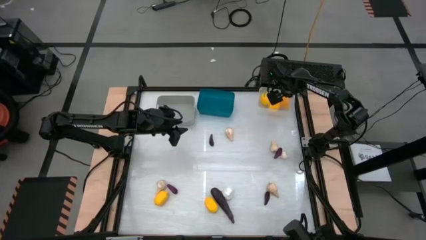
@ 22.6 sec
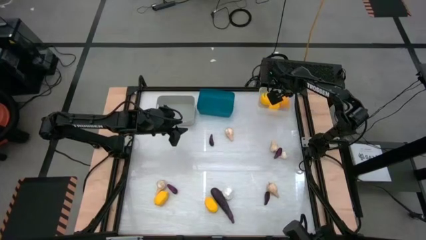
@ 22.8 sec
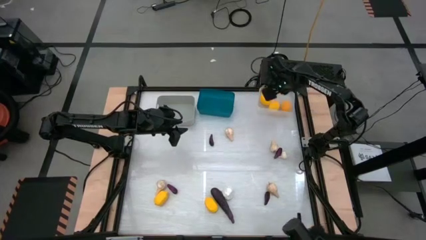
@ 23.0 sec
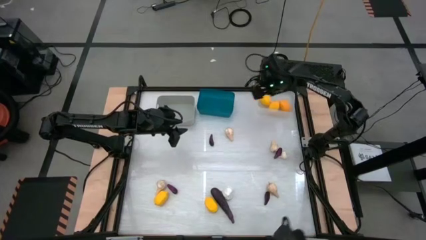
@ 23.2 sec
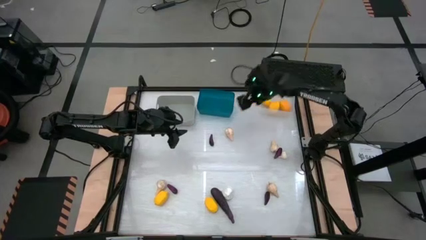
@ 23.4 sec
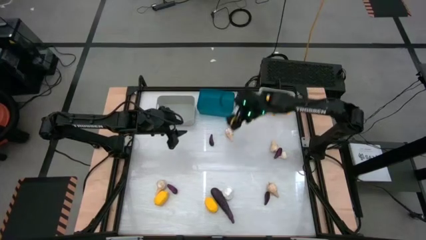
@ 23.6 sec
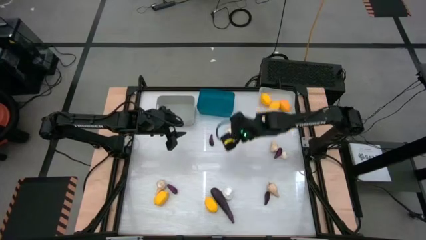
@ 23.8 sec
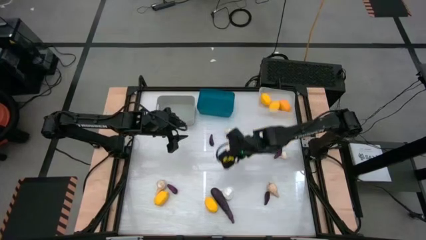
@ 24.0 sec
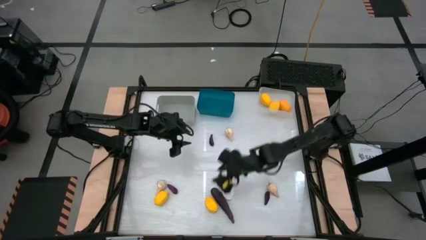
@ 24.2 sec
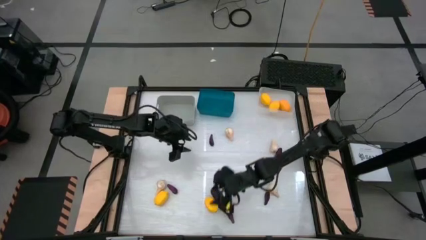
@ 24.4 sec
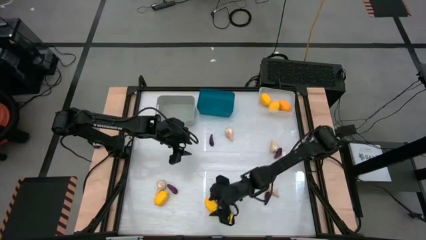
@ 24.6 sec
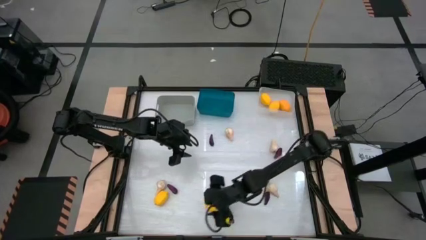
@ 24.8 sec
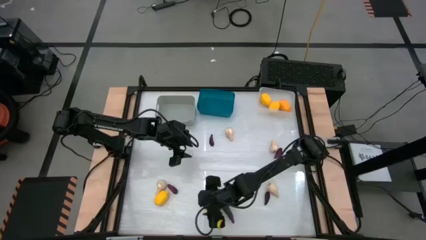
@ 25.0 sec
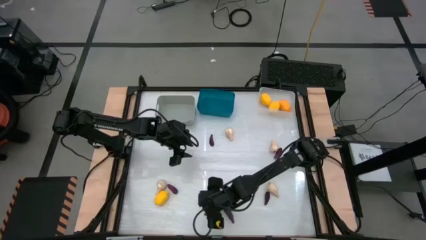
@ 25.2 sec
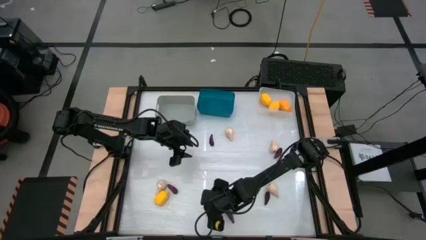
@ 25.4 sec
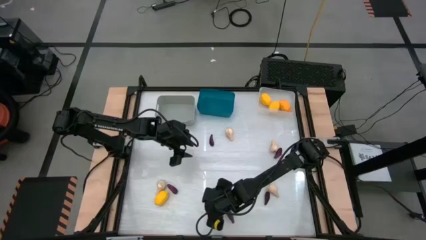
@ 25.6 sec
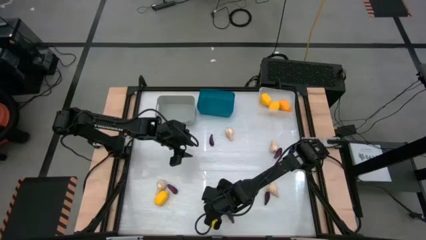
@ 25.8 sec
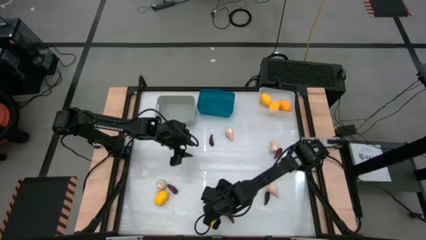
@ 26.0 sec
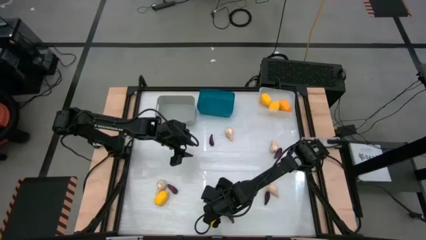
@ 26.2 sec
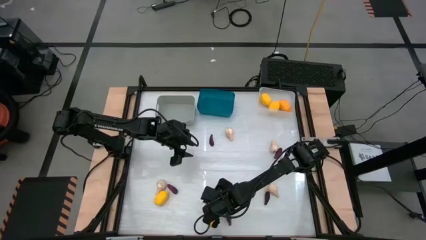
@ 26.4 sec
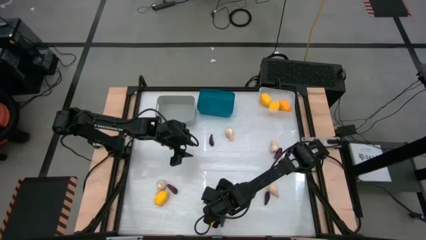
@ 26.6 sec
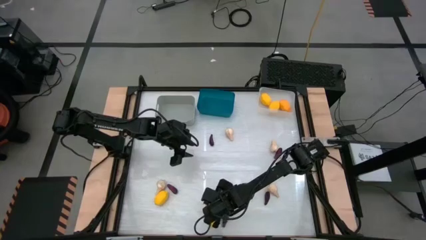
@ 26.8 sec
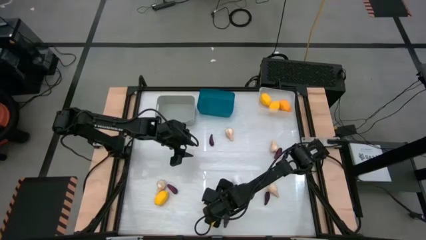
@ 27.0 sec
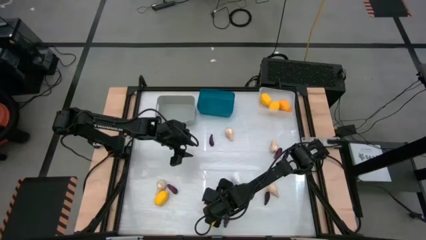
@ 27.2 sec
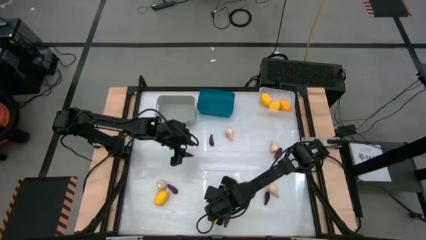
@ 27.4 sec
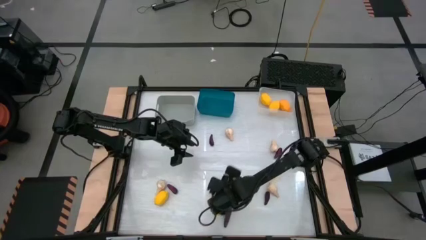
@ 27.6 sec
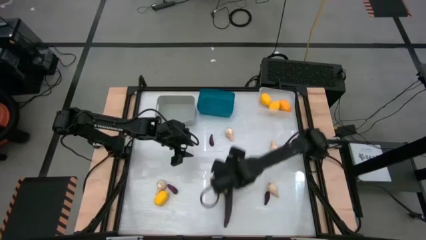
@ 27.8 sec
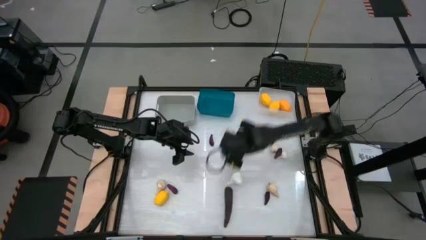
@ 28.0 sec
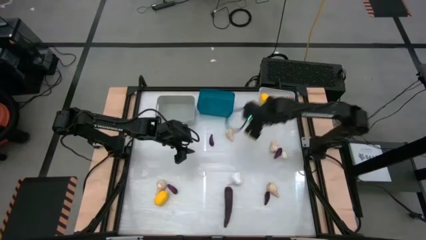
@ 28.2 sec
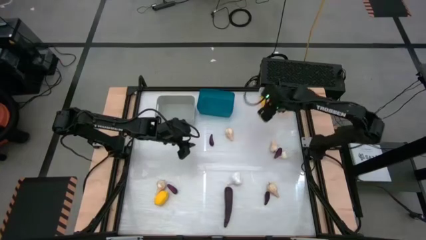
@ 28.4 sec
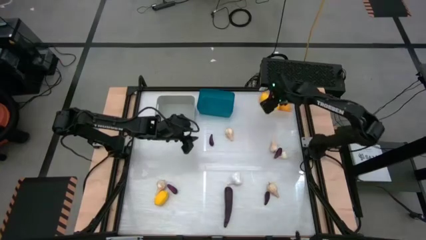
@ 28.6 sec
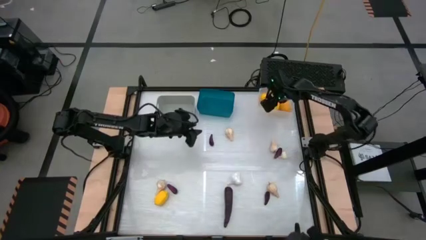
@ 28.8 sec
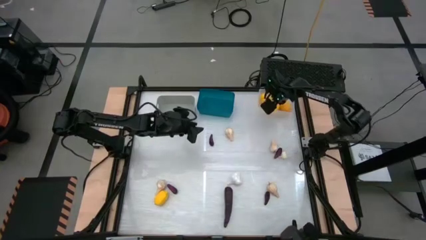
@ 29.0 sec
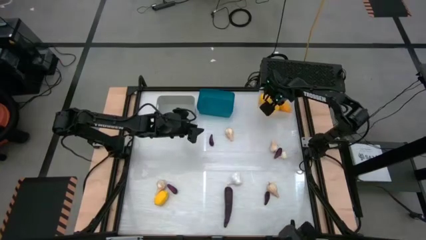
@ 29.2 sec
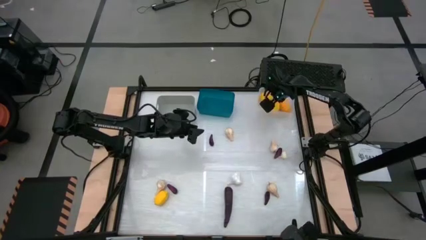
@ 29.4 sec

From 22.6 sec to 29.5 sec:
Task: Sort produce into baskets
Put the lemon into the transparent bin

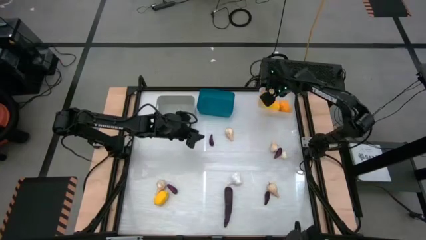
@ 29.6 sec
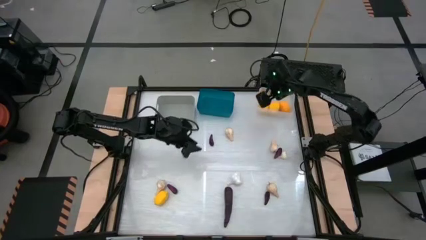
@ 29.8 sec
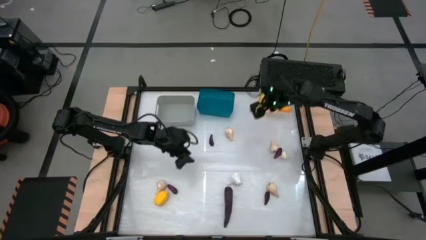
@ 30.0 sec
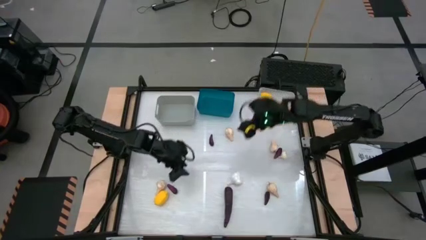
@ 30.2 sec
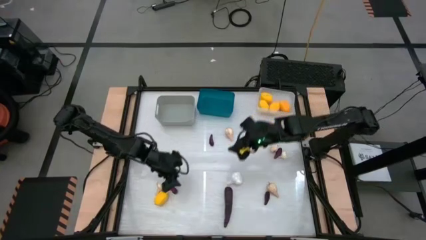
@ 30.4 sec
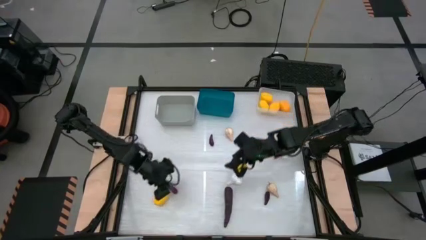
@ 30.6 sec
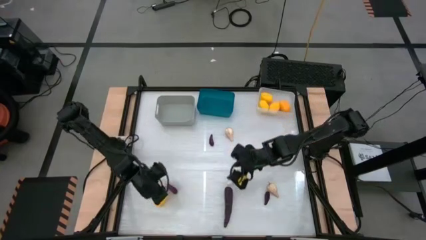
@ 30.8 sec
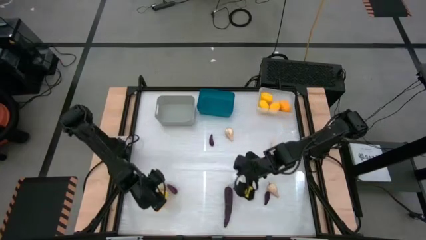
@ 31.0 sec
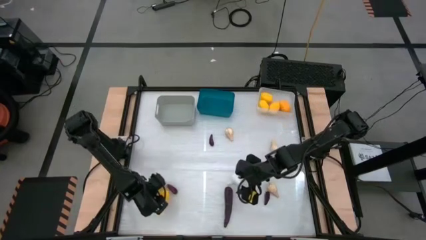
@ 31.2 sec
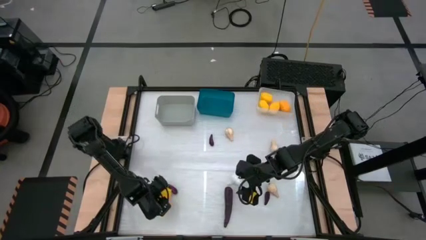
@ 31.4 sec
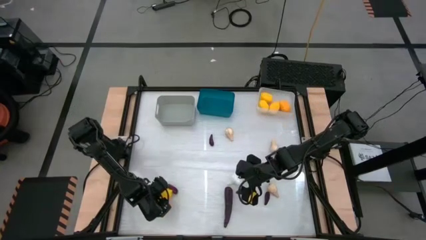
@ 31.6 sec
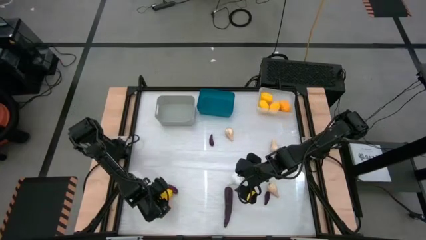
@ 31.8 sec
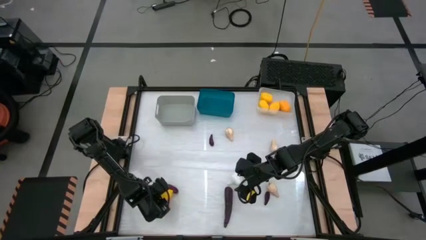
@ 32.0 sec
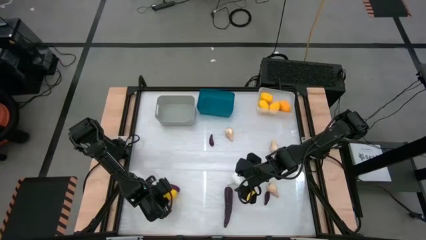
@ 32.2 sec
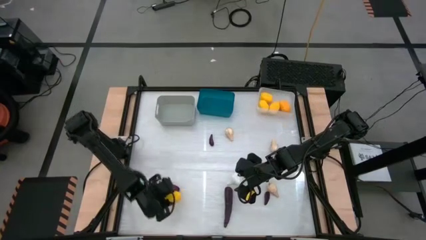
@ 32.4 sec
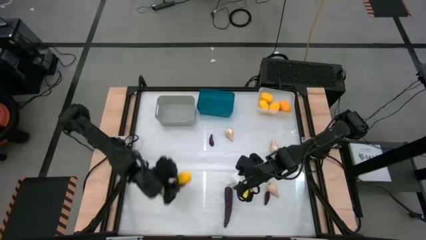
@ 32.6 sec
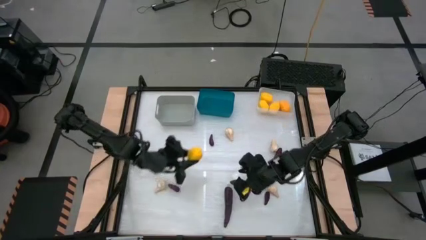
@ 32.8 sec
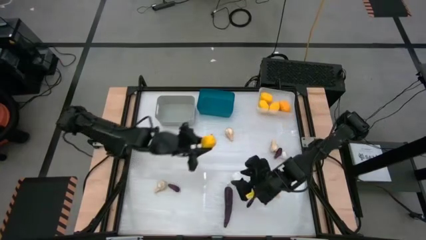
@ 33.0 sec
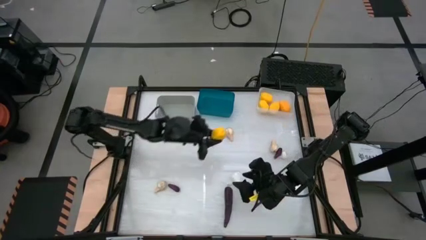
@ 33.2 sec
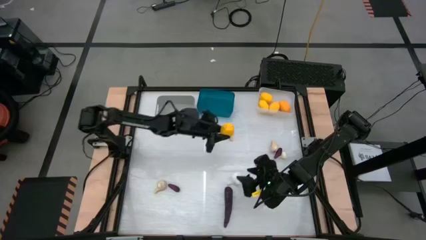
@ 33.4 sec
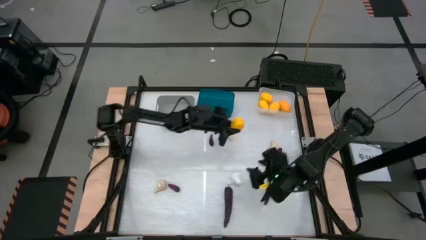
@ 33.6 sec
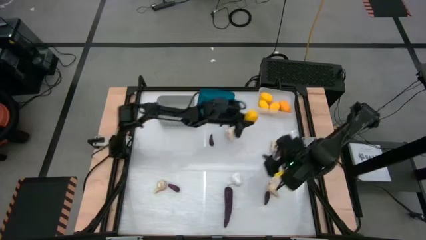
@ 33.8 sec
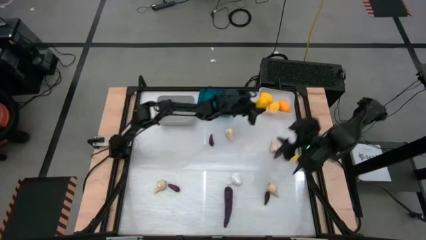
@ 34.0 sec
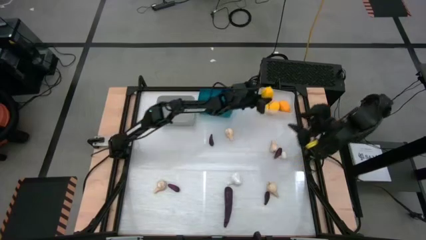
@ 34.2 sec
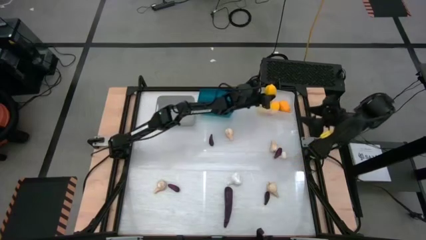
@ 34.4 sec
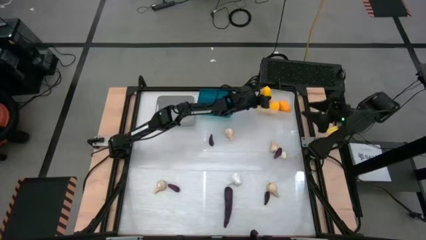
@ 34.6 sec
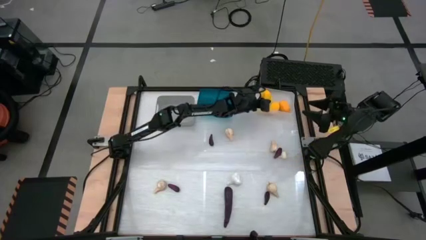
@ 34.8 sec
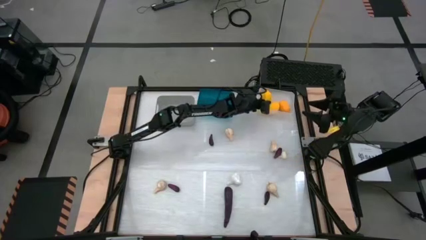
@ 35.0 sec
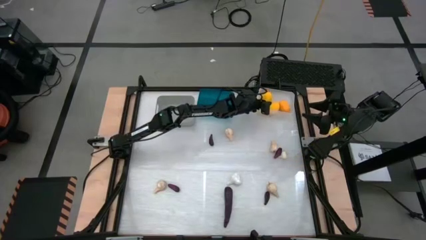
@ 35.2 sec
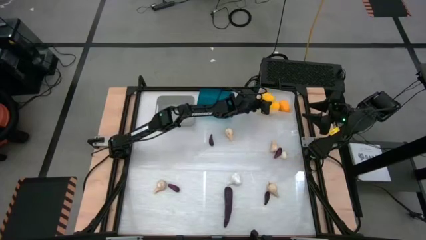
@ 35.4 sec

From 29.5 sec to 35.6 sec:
Put the lemon into the transparent bin

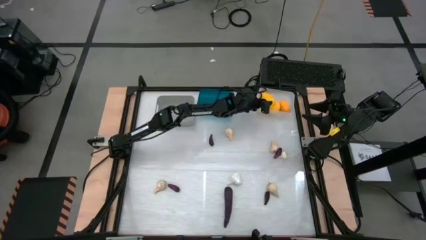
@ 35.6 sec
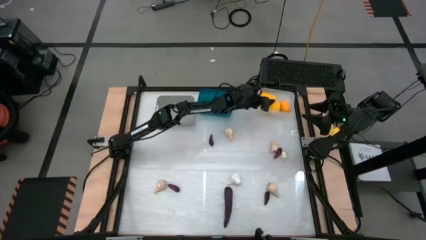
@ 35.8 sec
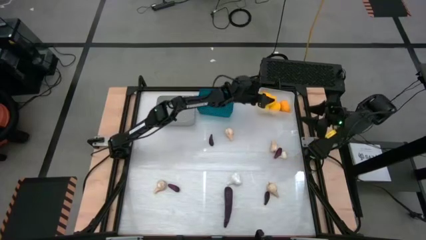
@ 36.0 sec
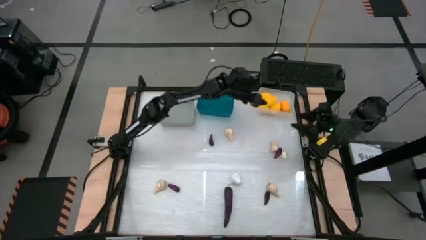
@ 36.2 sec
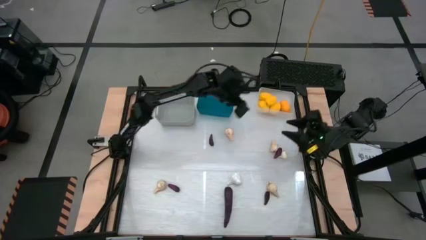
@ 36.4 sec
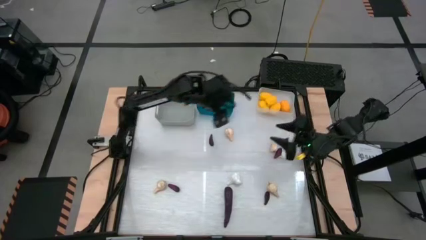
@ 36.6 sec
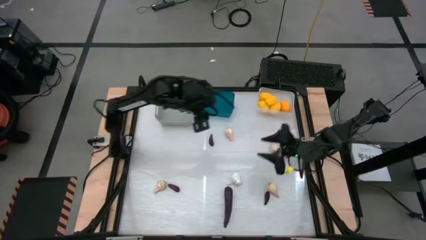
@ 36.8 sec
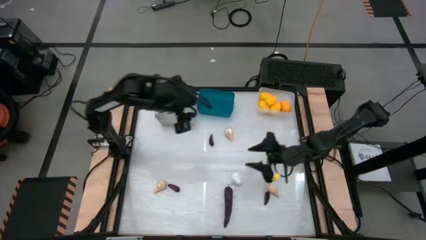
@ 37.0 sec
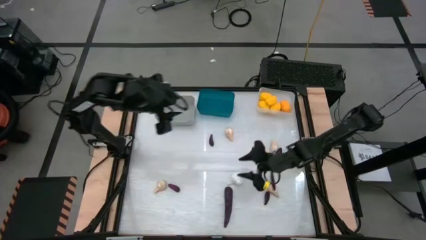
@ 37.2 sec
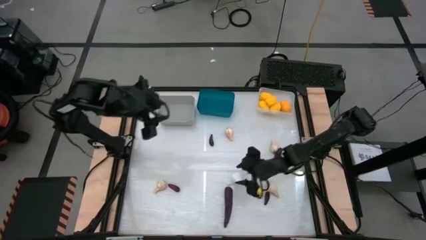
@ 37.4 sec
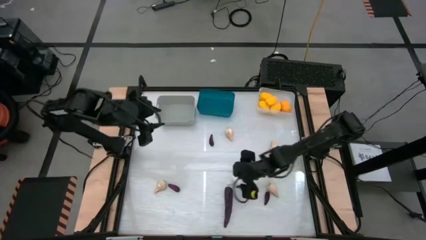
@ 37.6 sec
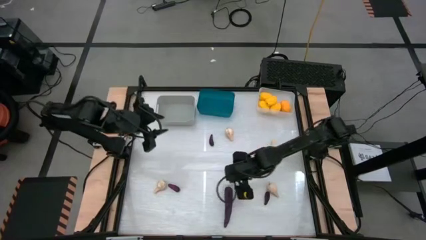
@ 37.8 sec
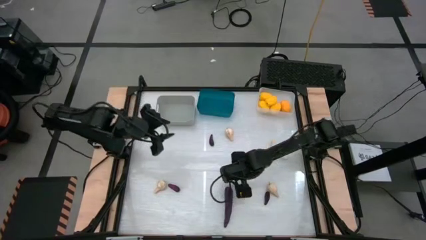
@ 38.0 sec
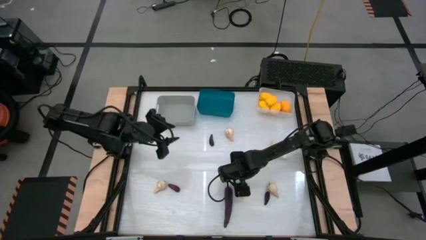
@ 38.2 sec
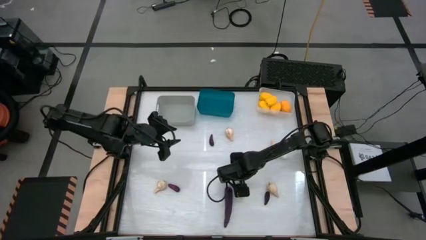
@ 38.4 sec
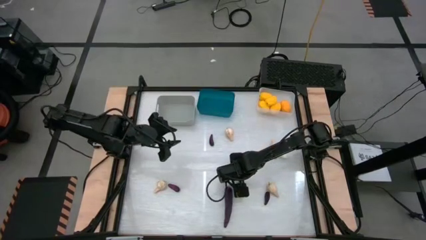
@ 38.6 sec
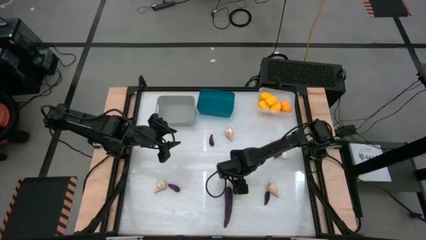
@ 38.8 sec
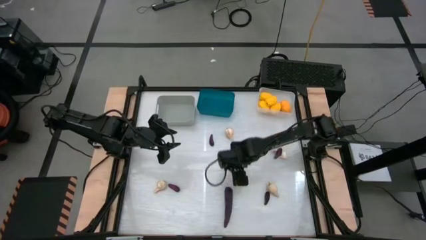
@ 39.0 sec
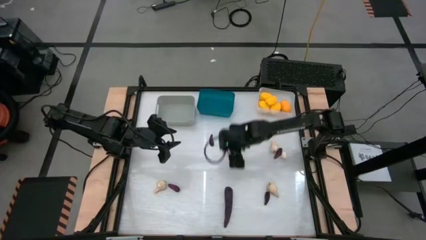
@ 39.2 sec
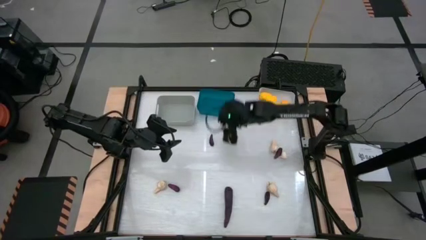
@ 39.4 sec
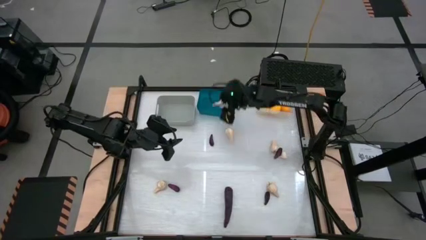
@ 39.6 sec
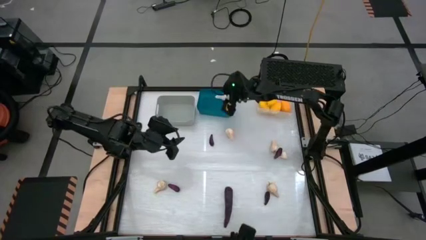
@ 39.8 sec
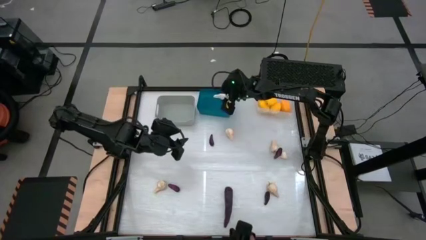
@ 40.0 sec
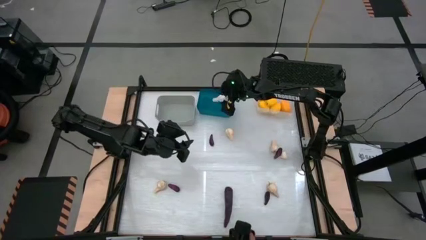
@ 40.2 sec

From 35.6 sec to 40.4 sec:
Put the garlic into the blue bin
